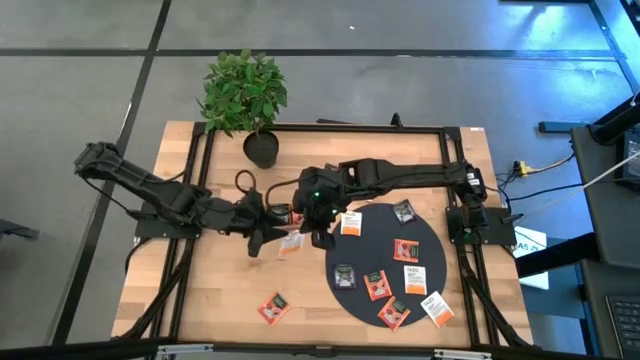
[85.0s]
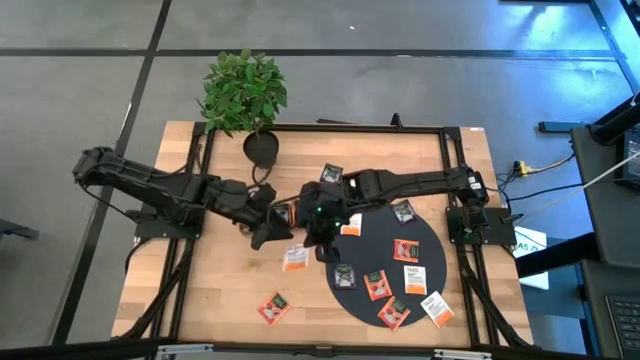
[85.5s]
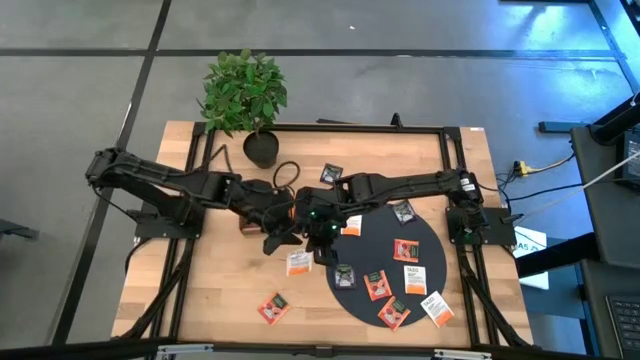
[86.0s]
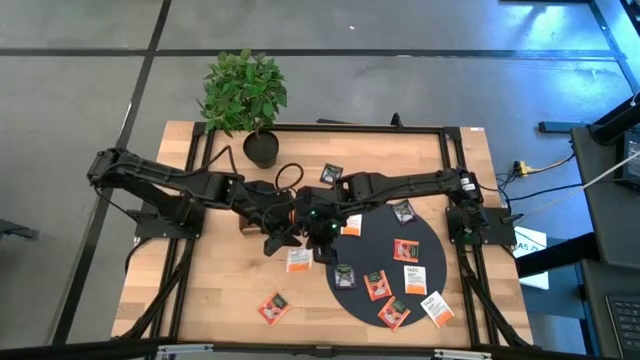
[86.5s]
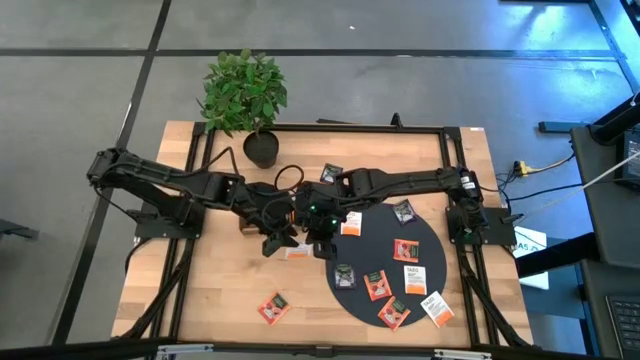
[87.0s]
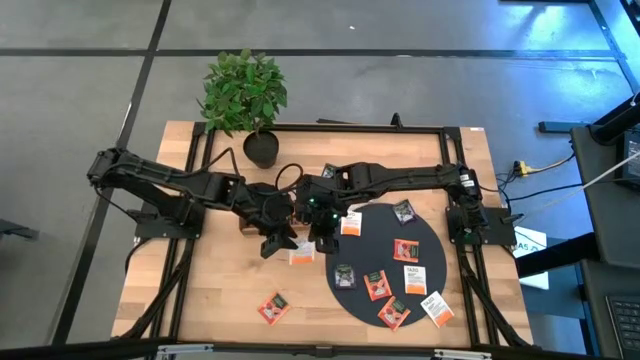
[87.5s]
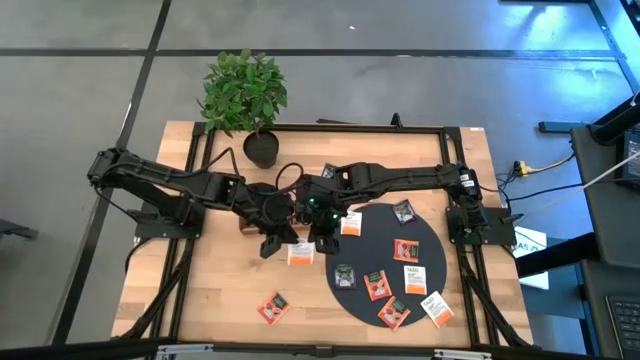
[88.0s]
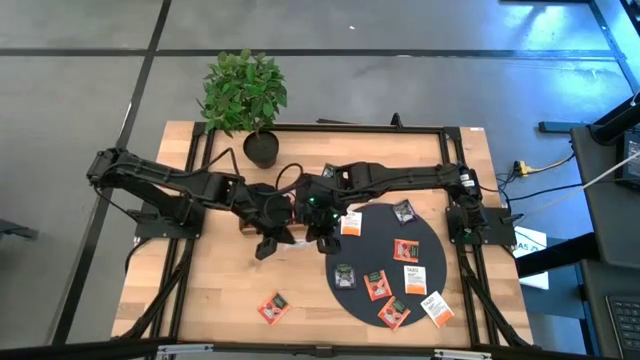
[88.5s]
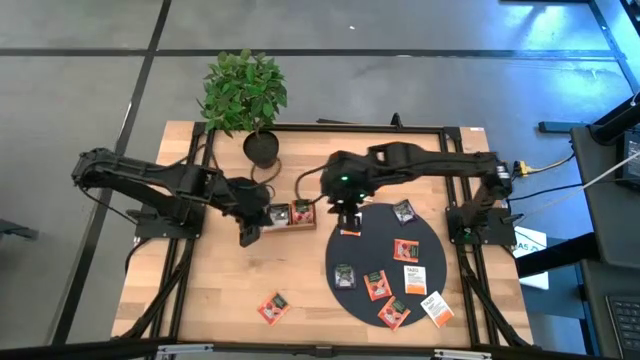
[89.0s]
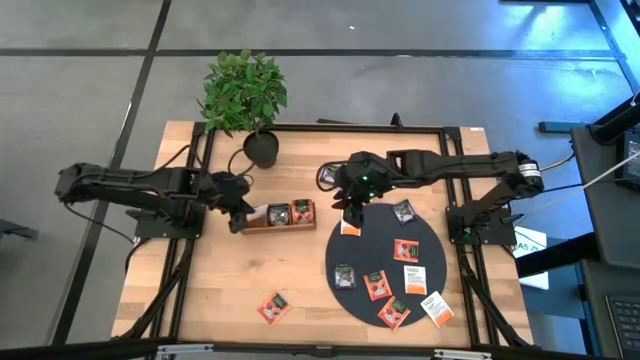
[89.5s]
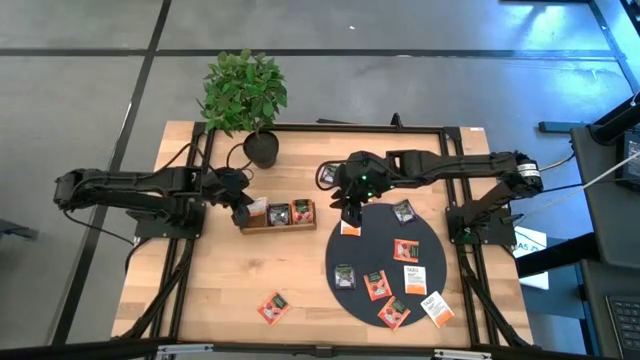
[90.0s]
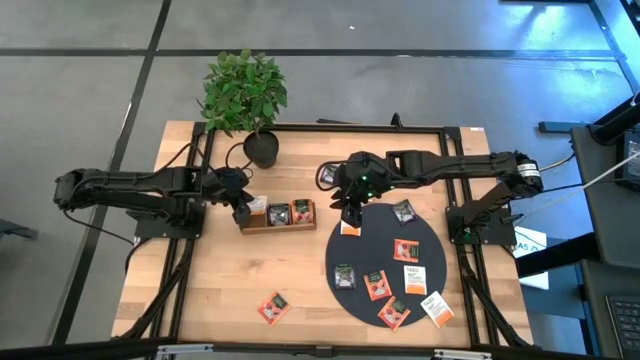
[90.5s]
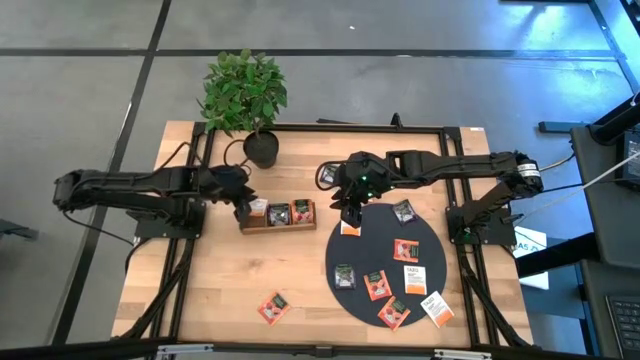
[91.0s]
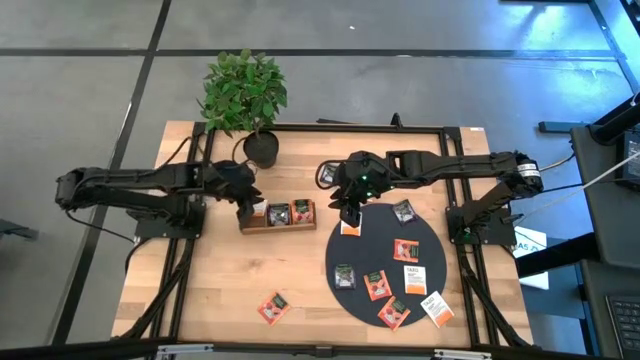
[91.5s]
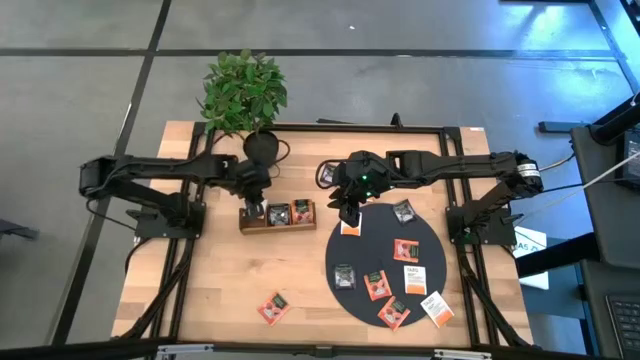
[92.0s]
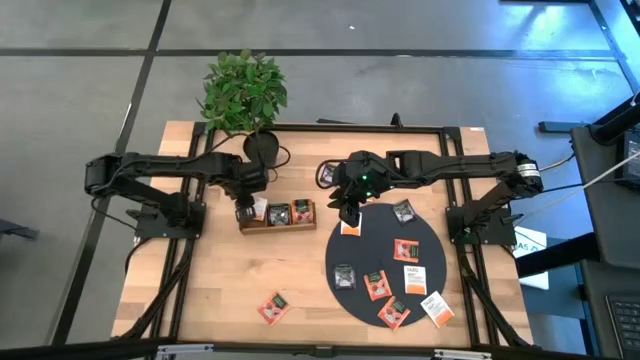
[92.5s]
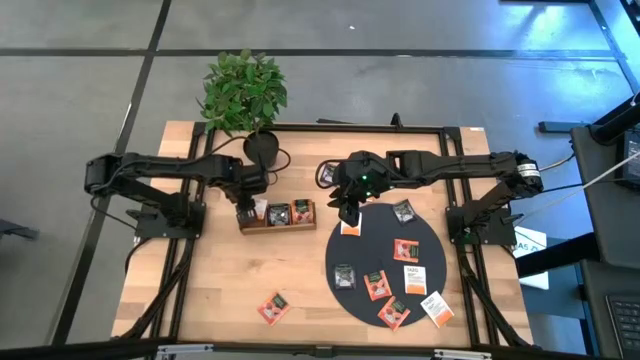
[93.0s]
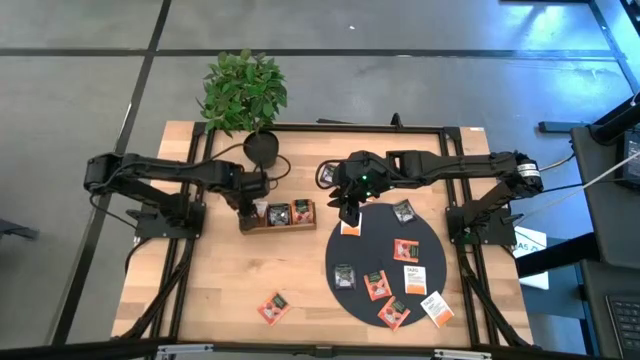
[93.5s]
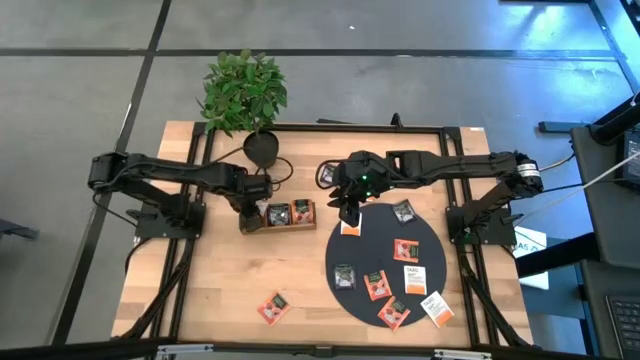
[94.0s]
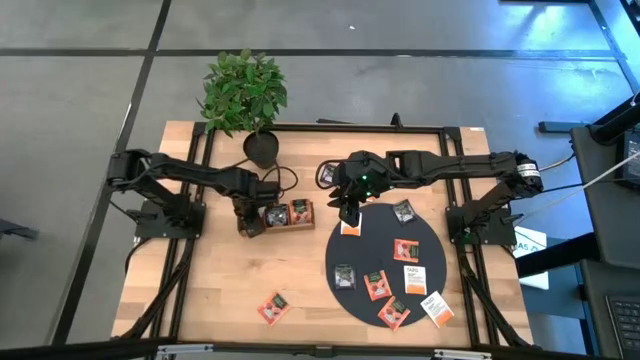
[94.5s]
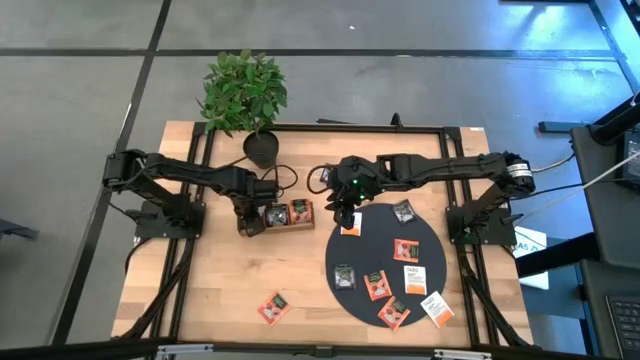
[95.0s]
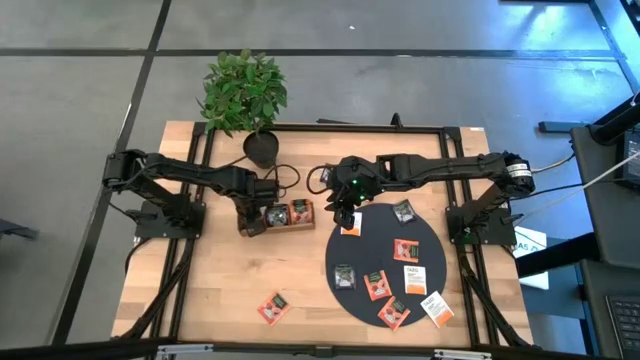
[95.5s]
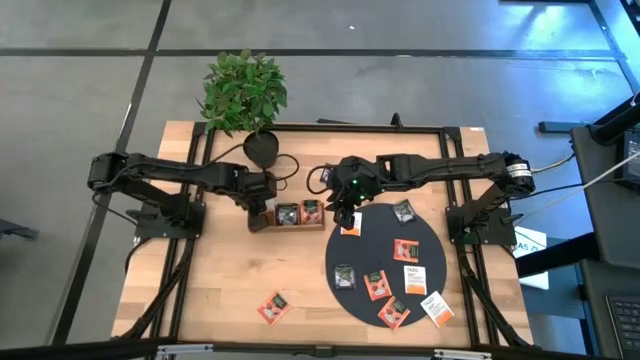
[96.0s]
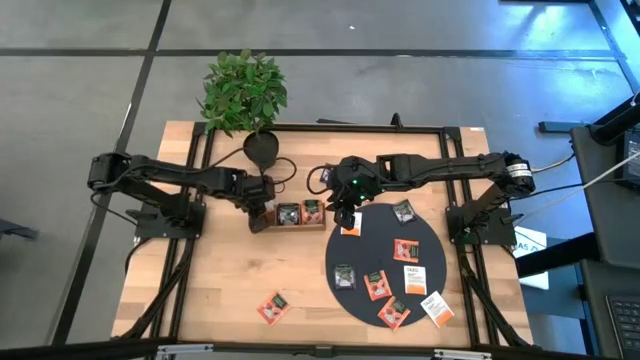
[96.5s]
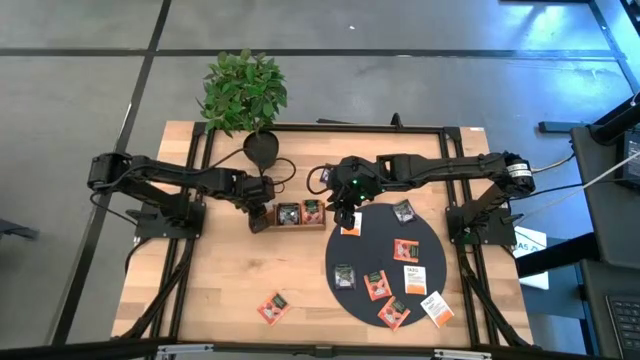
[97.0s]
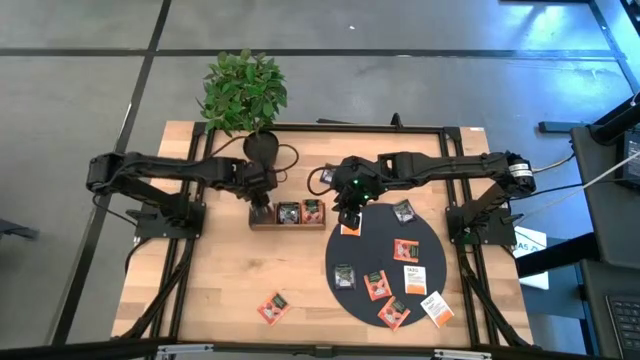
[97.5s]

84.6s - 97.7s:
Task: Pick & Place Tea
Put the white tea bag into the left section of the wooden organizer

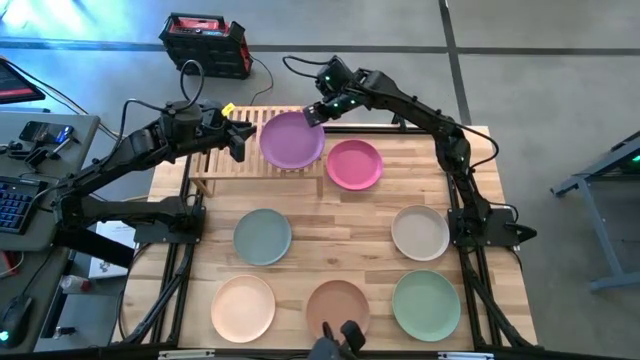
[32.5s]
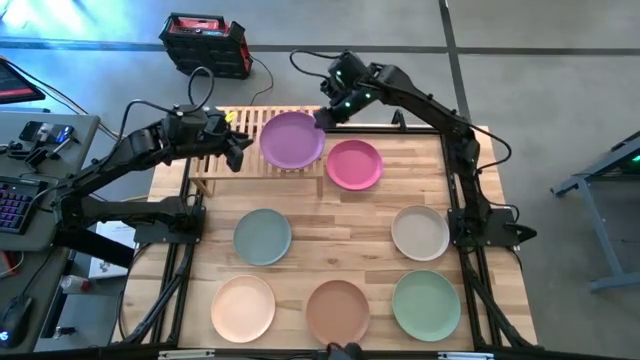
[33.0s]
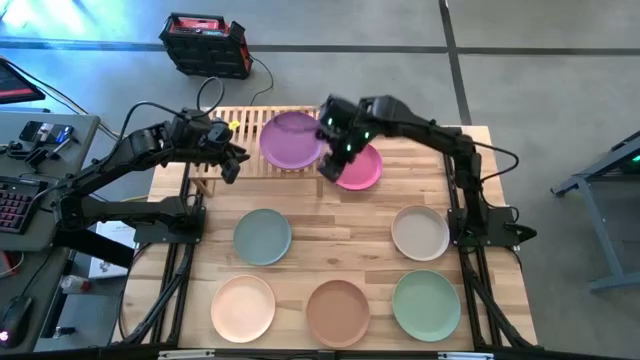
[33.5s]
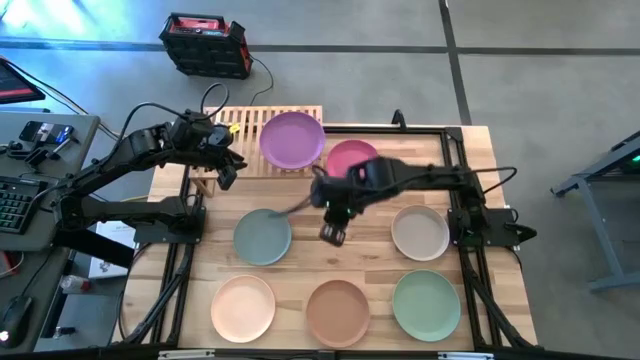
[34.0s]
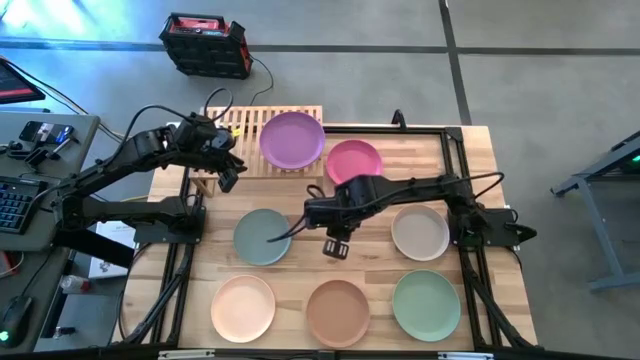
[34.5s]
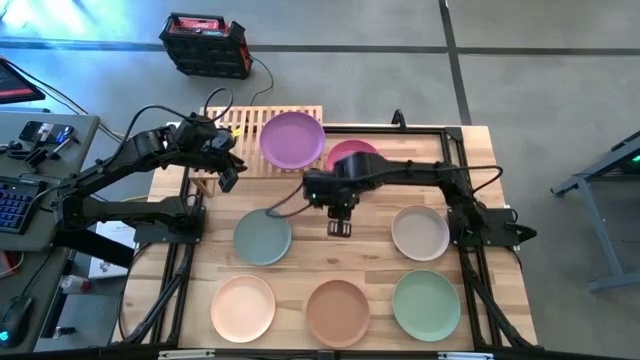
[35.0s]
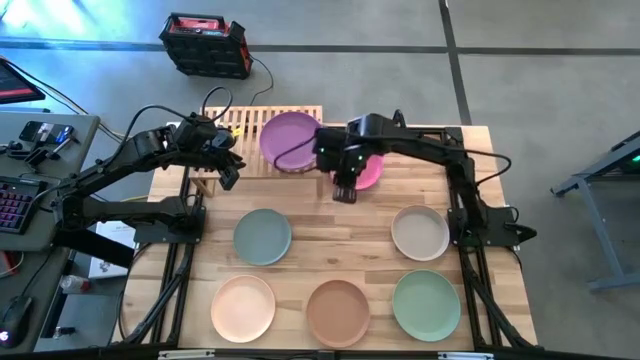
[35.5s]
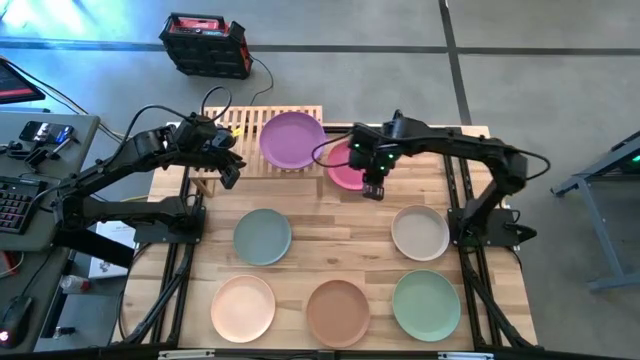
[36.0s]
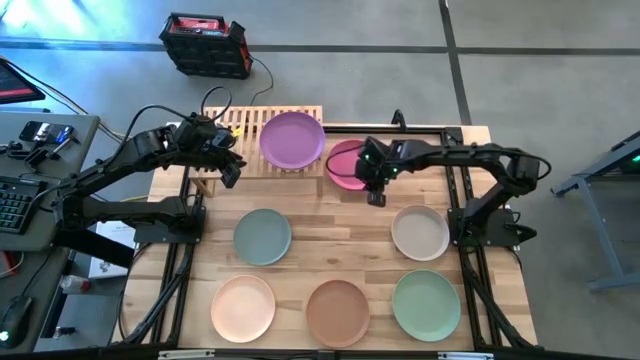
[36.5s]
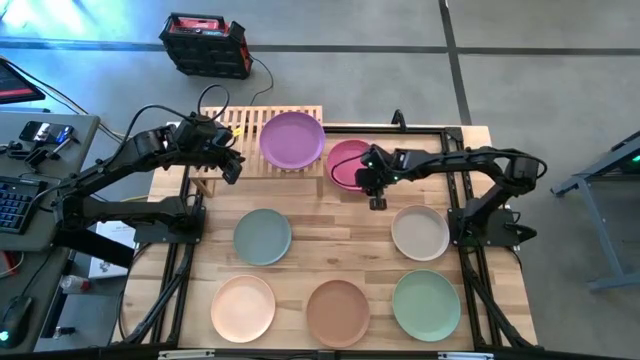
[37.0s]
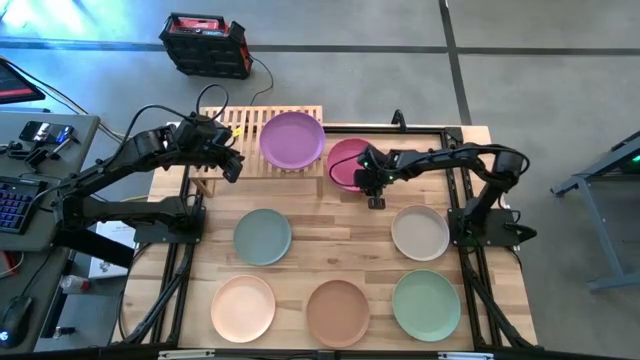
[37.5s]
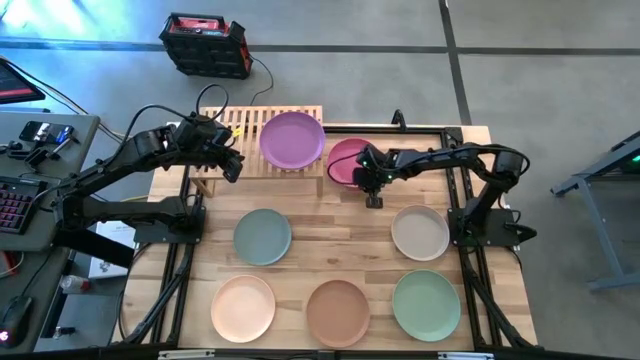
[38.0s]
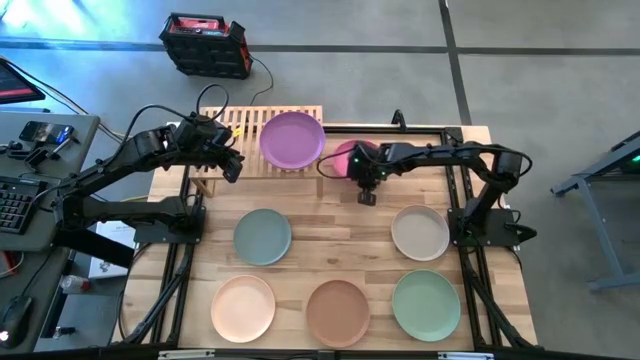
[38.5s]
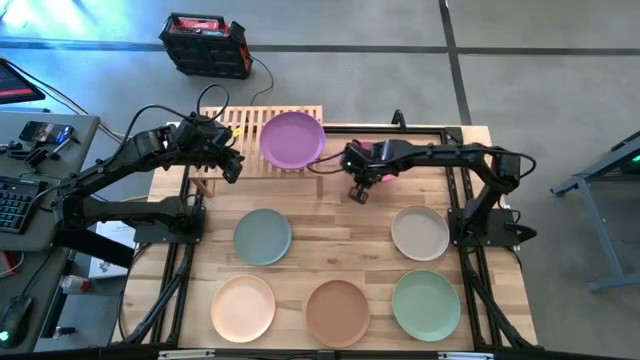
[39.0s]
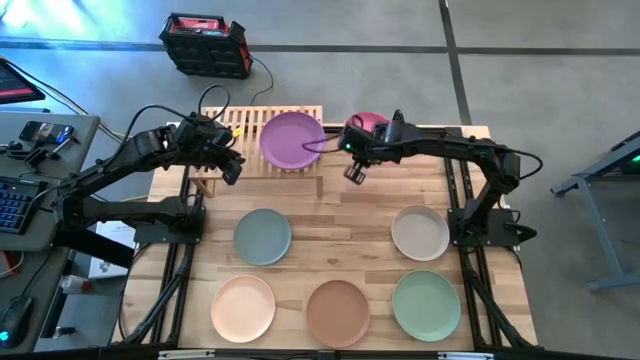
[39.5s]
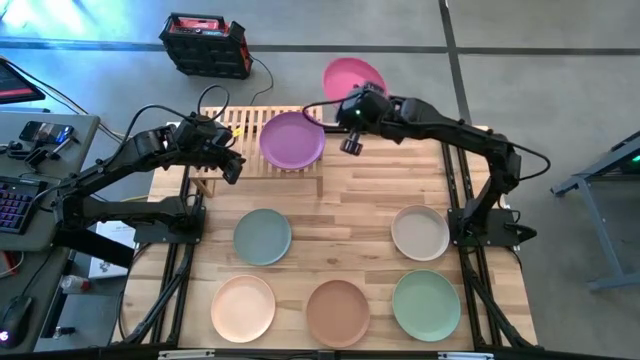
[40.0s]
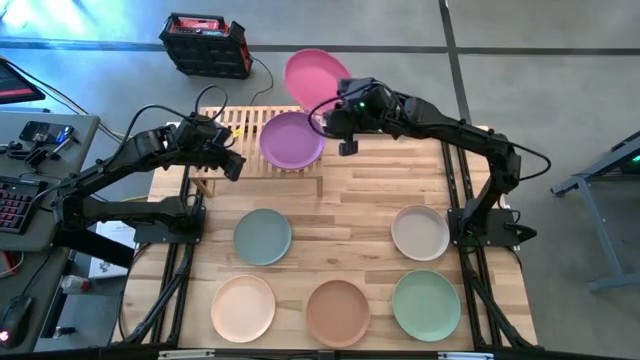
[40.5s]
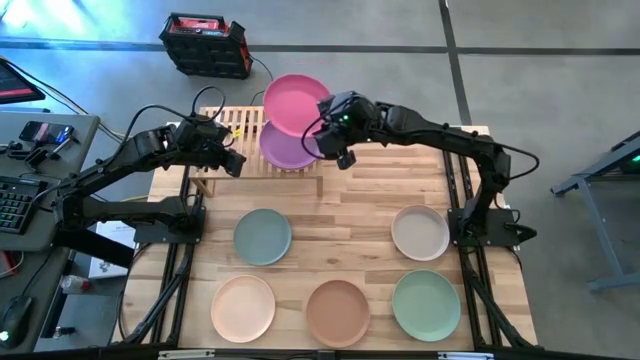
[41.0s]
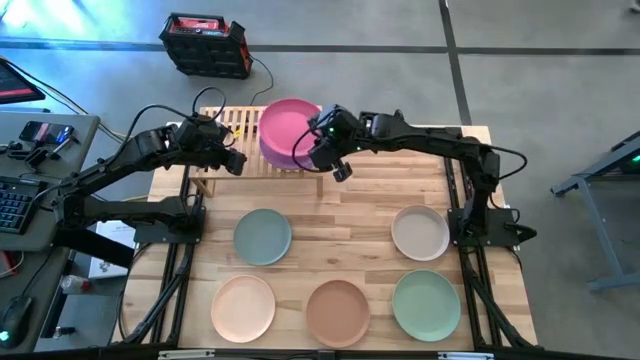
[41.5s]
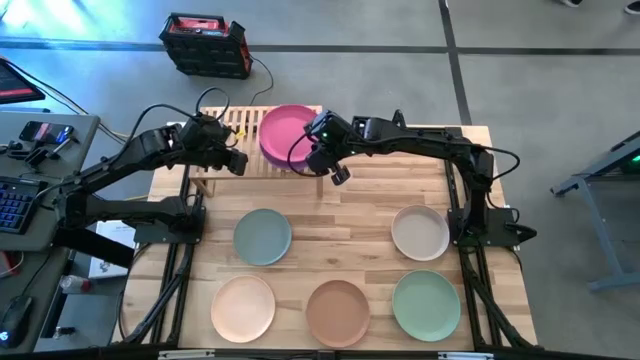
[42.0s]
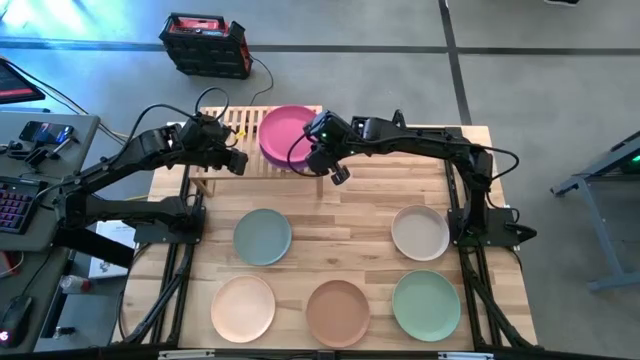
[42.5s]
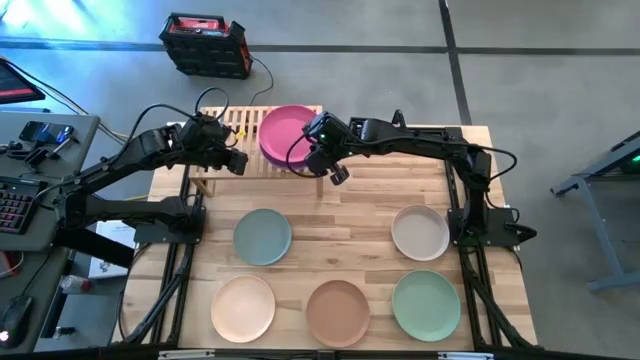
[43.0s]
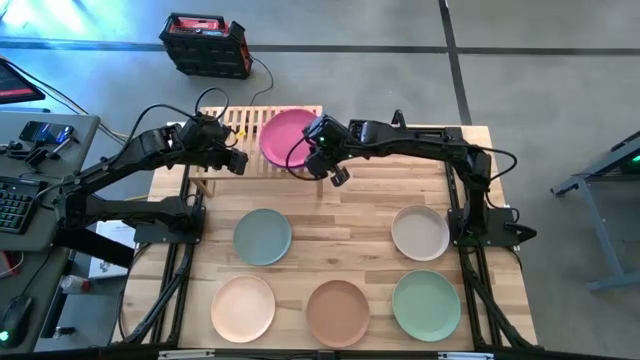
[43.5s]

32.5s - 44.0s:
Task: Place and stack plates onto a shelf
Stack the pink plate on top of the violet plate on the shelf
